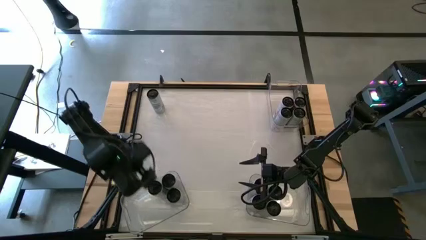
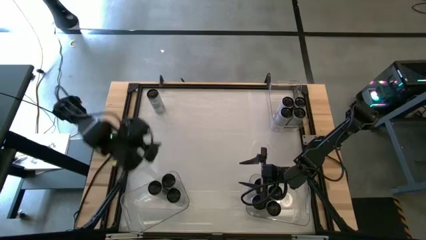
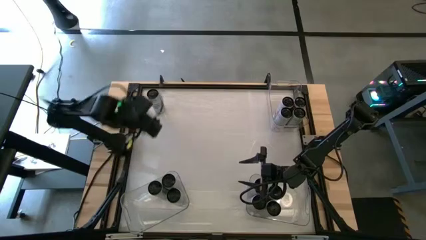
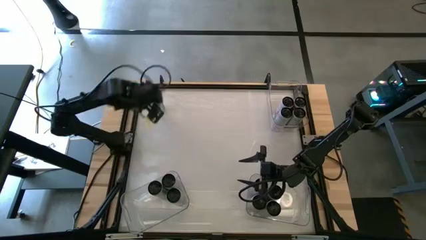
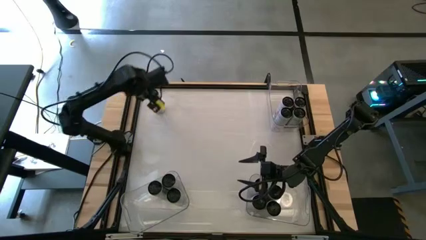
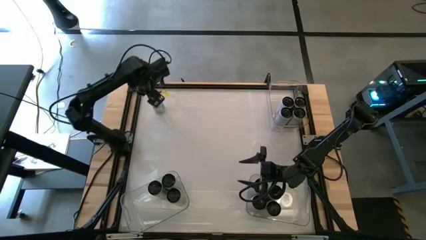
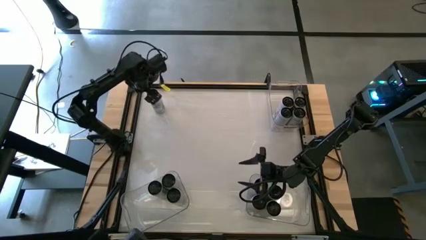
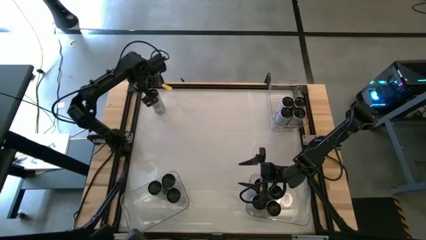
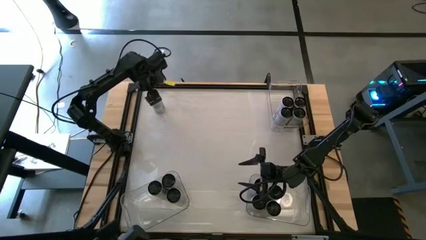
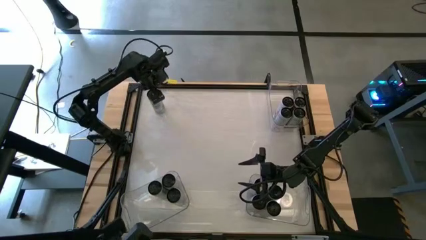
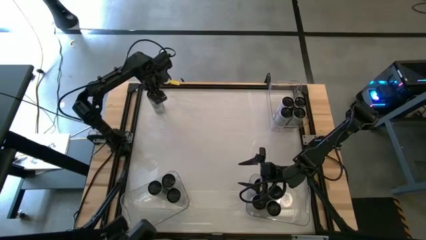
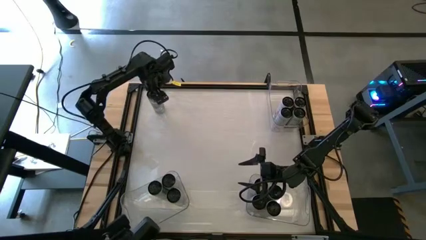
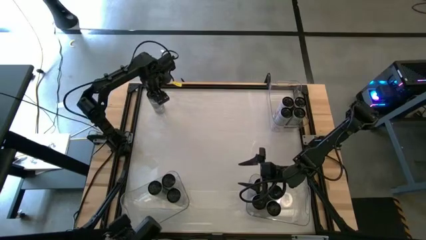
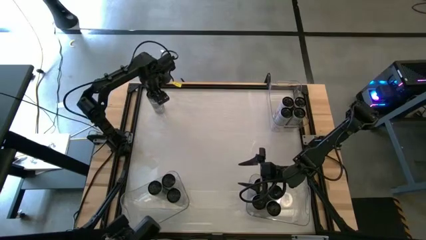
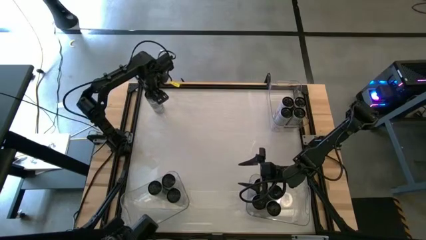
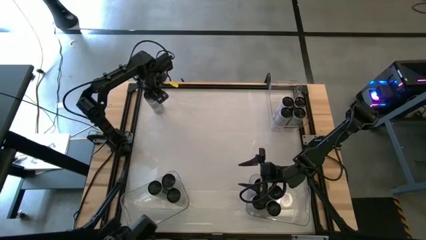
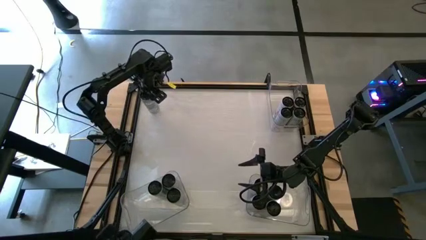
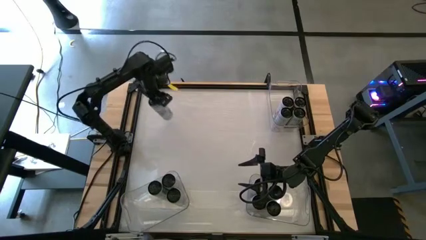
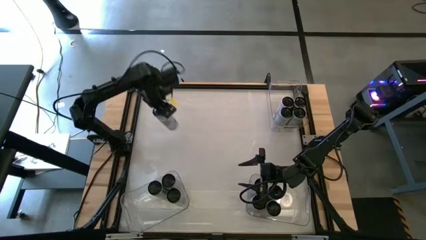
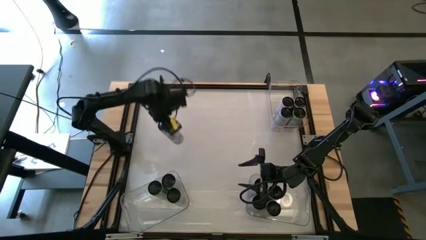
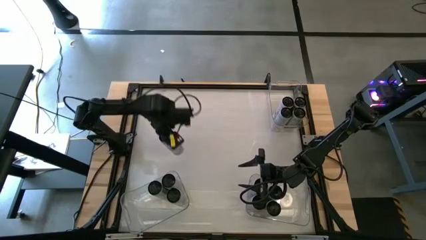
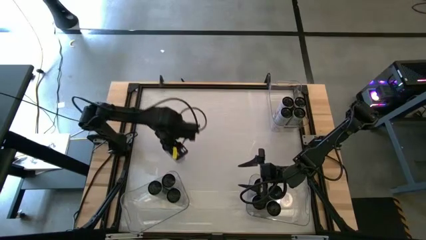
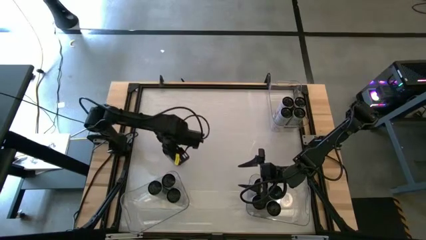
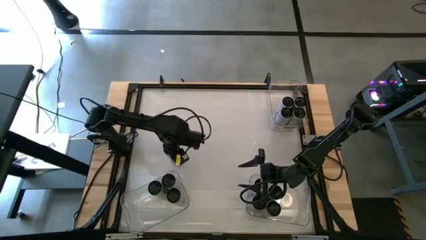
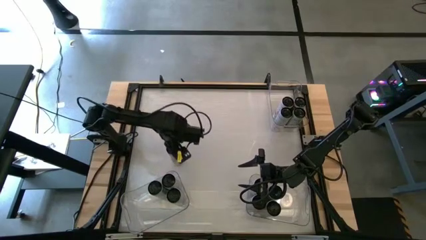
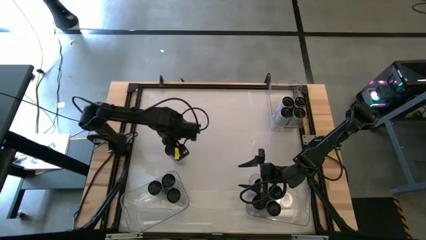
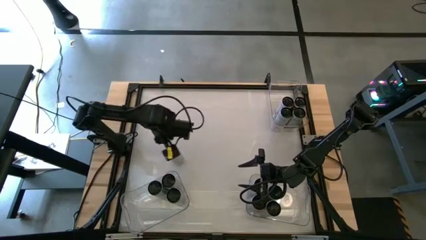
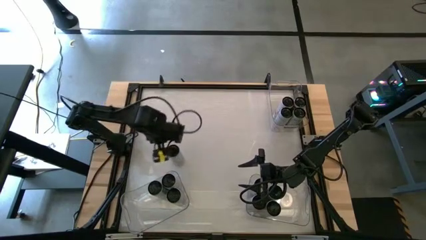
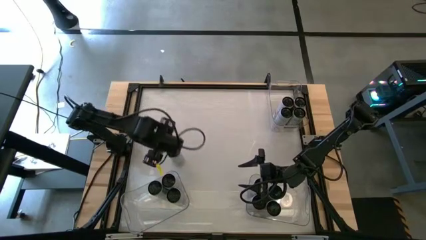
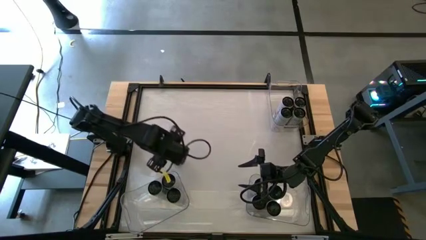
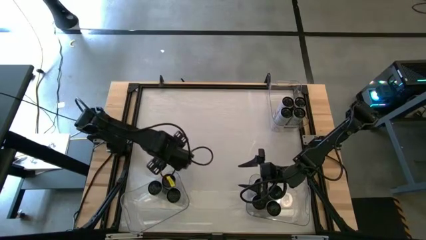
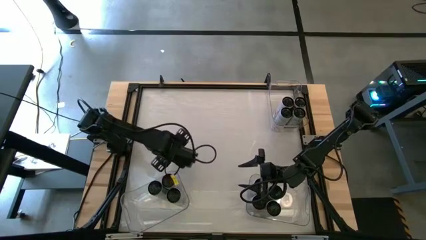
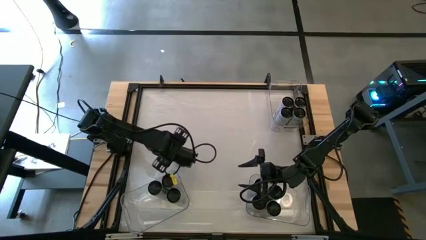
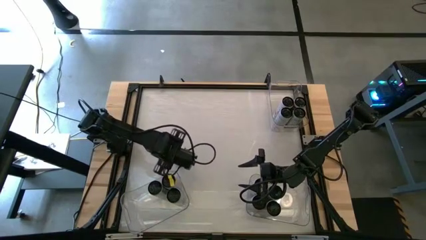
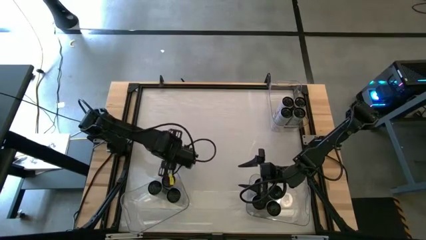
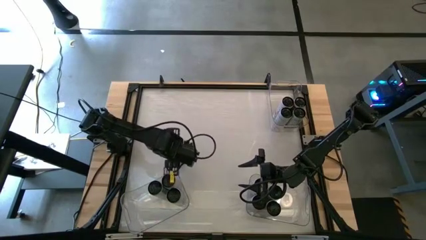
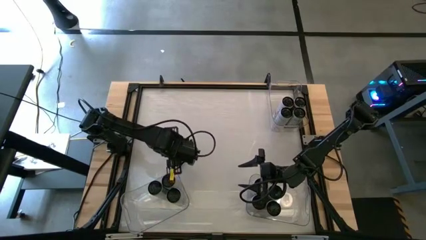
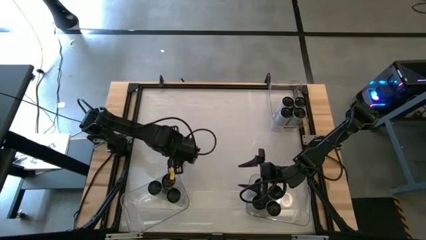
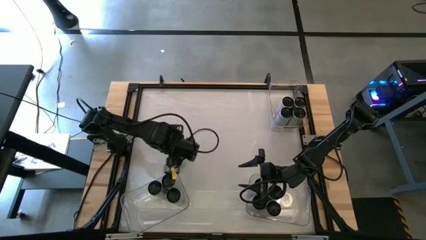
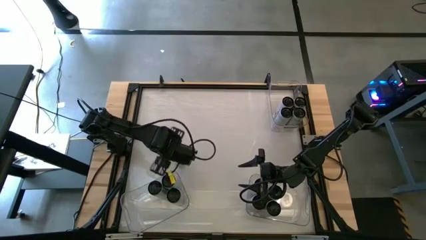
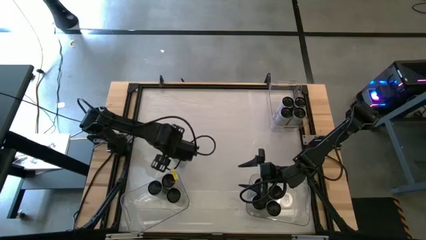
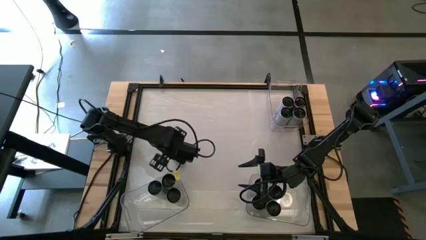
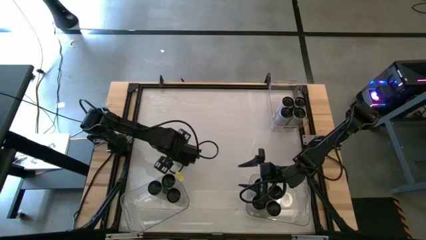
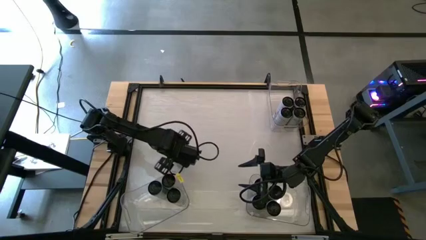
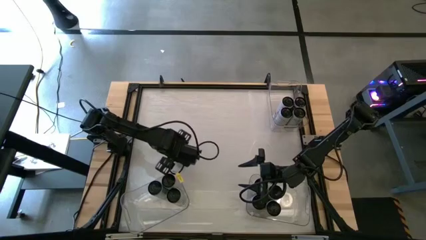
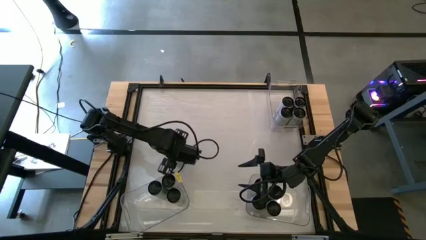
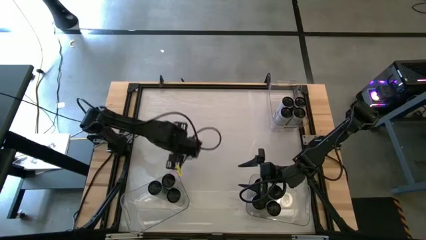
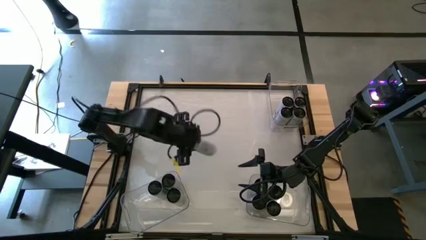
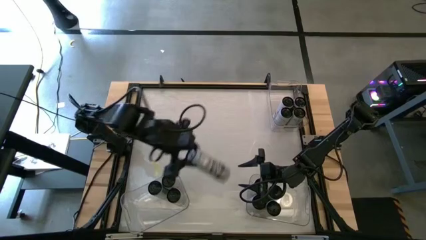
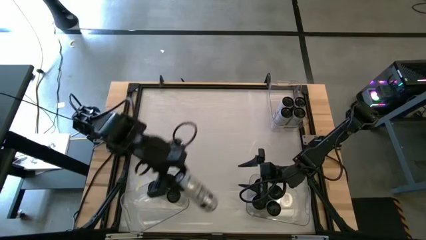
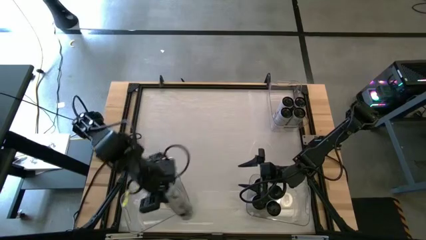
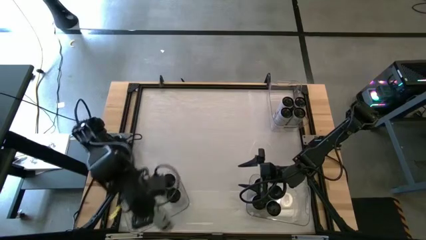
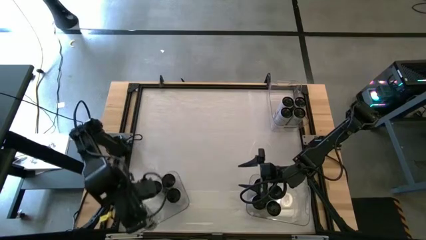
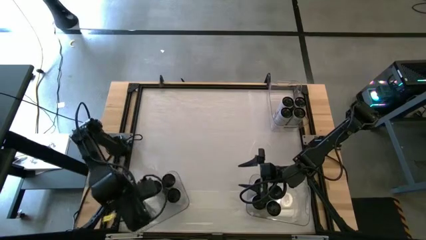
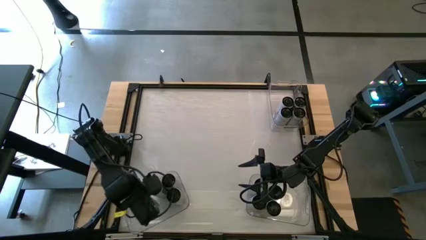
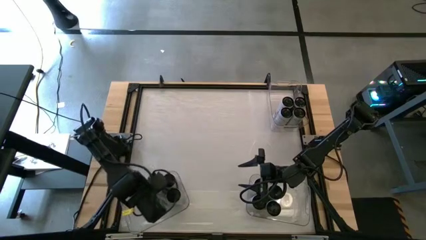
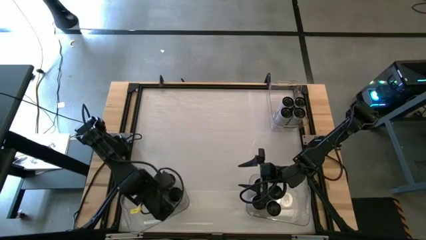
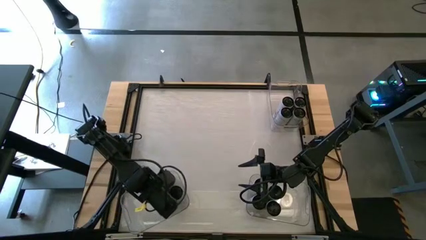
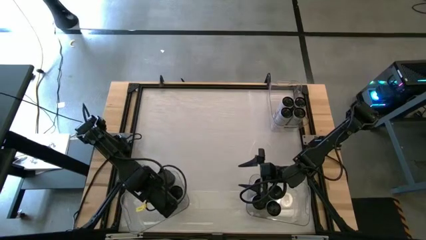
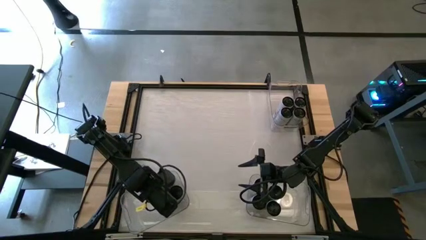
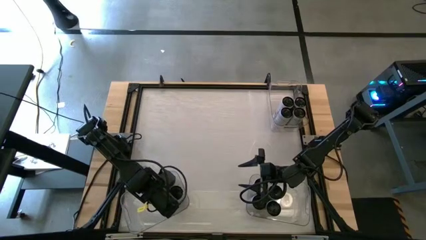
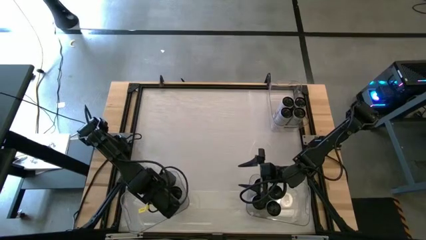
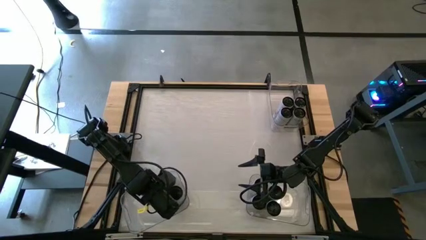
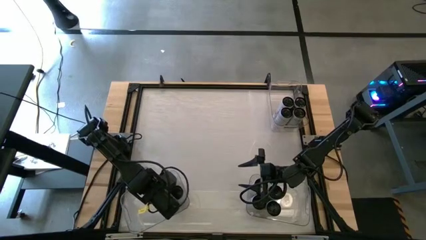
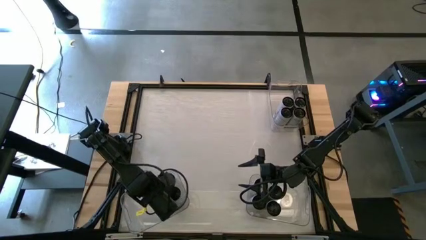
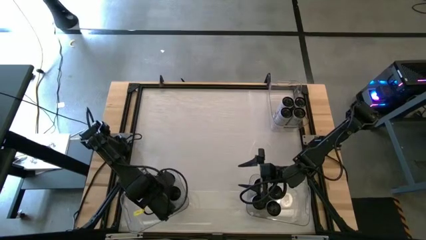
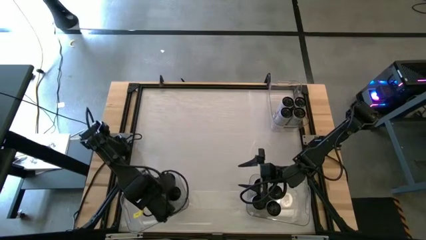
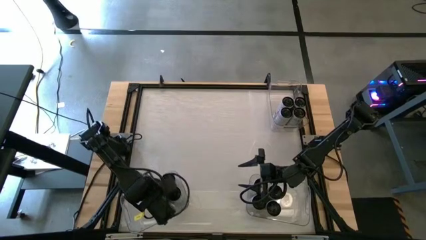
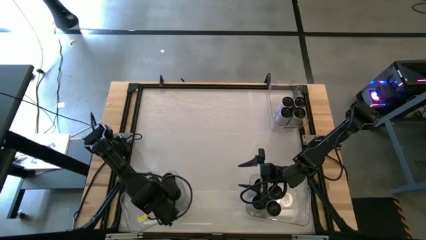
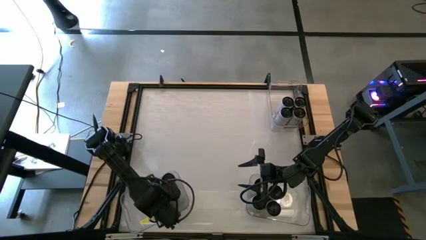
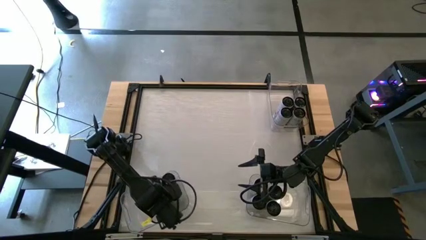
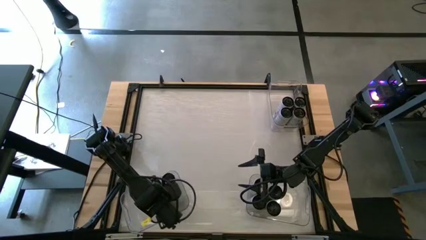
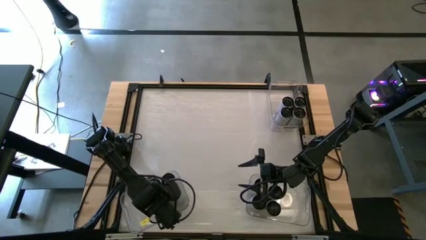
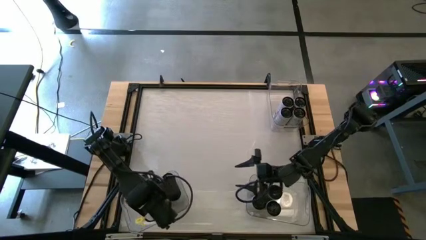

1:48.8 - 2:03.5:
Task: Sort soda cans
Put the white-blue soda can into the bottom left transparent bin

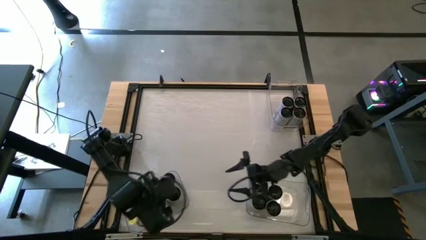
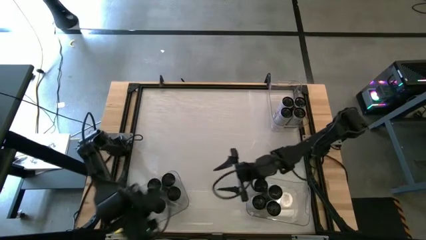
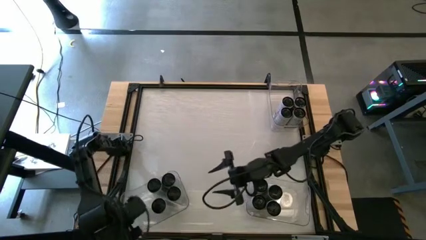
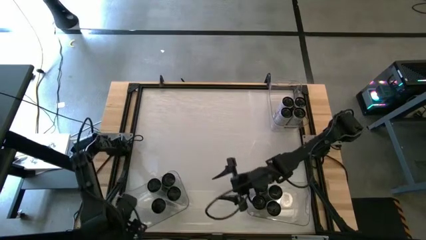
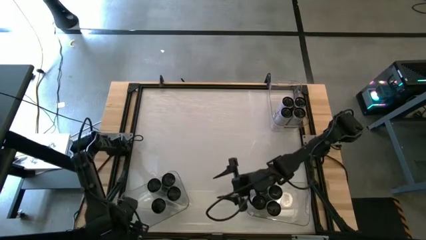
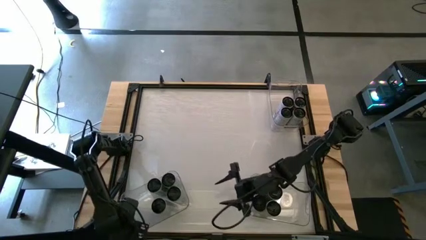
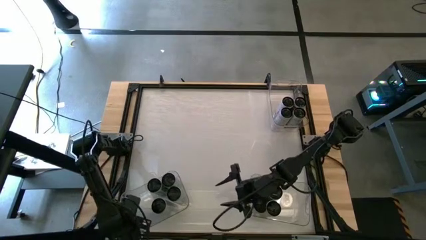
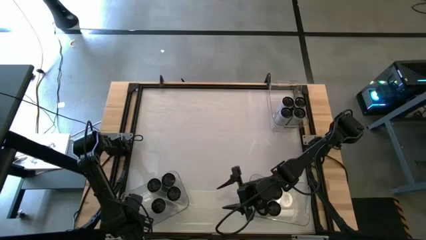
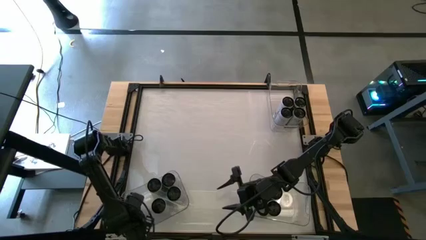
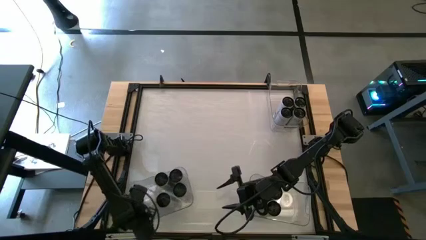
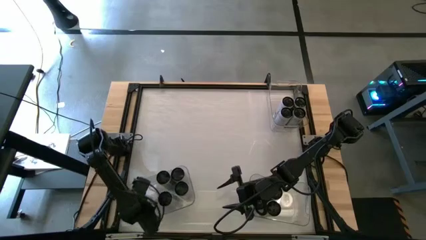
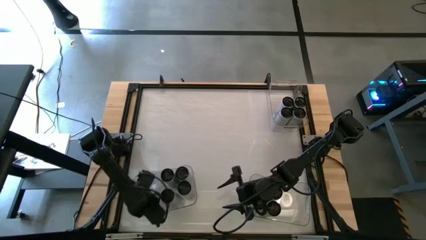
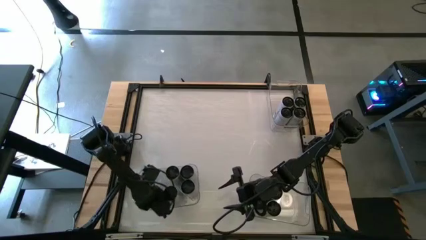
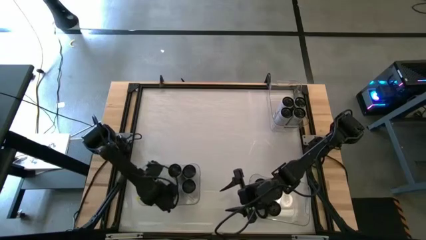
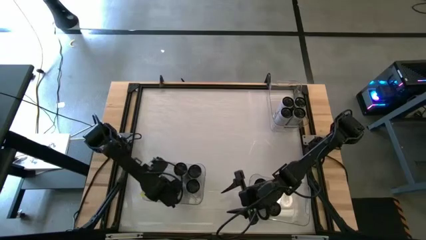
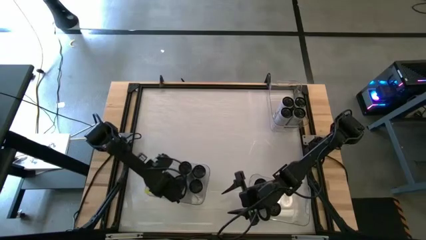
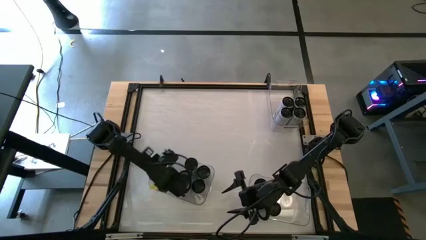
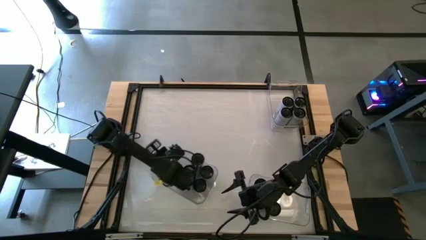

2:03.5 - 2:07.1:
Move the bottom left transparent bin
